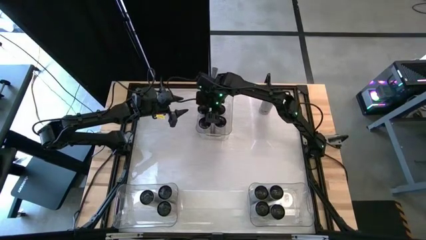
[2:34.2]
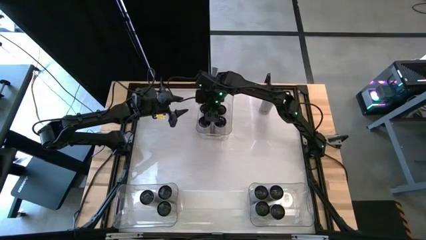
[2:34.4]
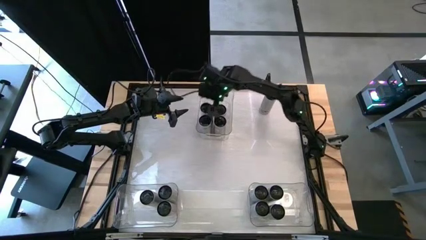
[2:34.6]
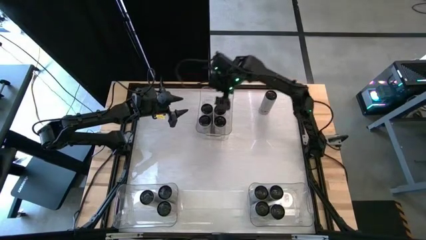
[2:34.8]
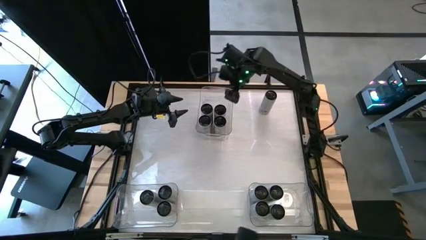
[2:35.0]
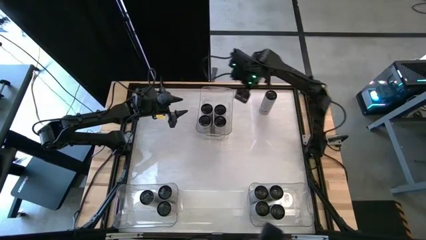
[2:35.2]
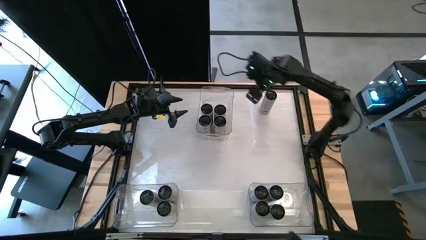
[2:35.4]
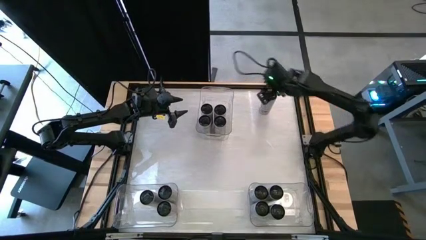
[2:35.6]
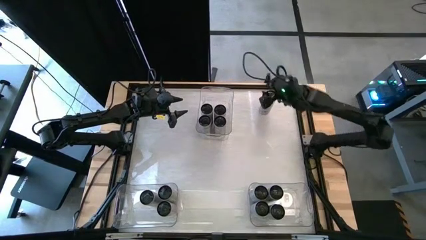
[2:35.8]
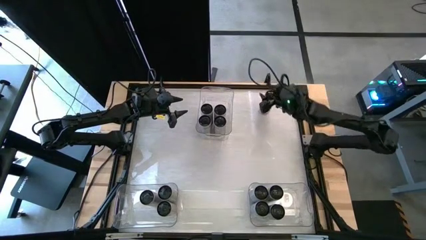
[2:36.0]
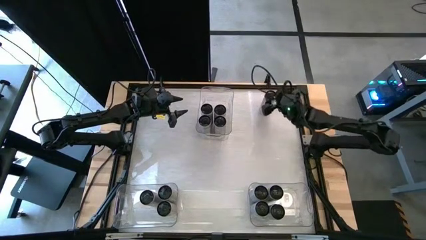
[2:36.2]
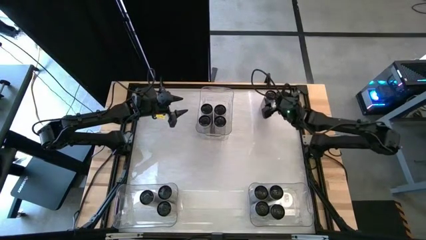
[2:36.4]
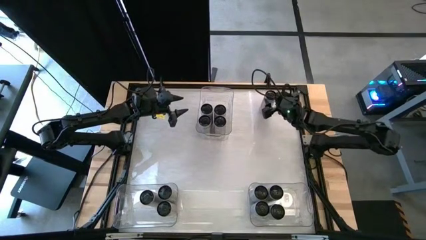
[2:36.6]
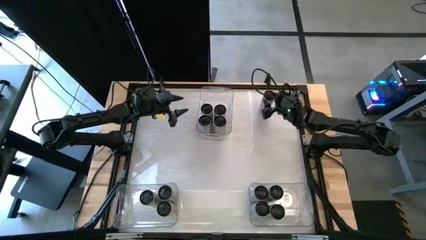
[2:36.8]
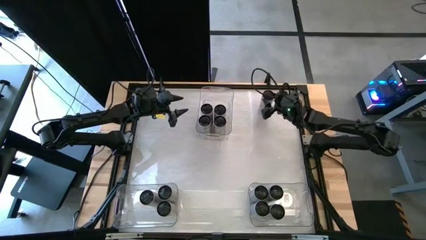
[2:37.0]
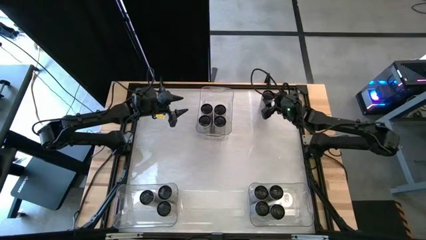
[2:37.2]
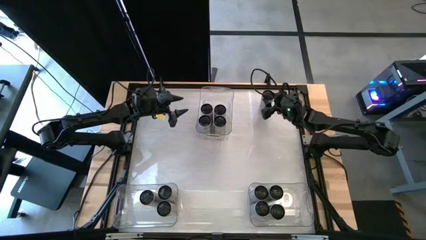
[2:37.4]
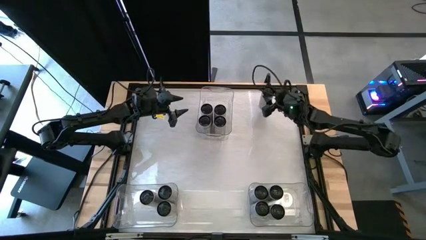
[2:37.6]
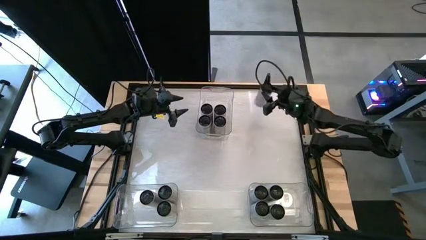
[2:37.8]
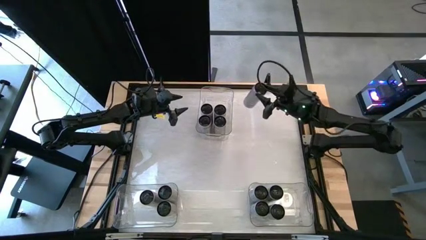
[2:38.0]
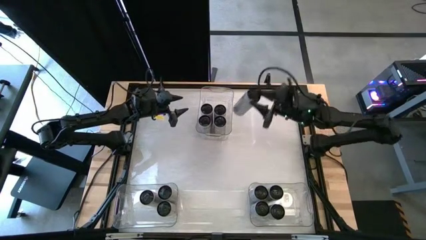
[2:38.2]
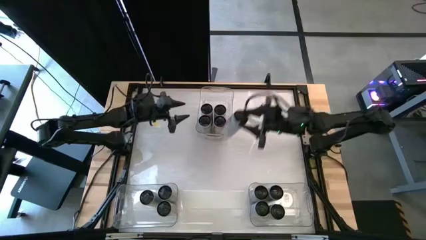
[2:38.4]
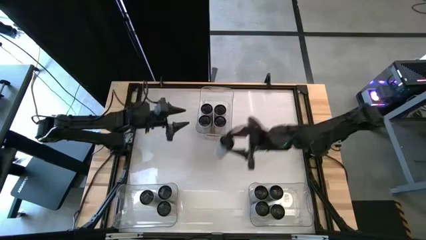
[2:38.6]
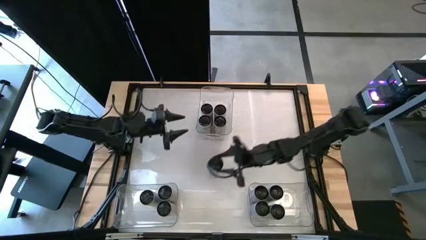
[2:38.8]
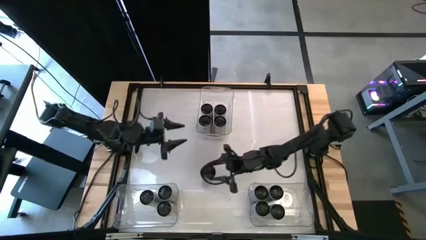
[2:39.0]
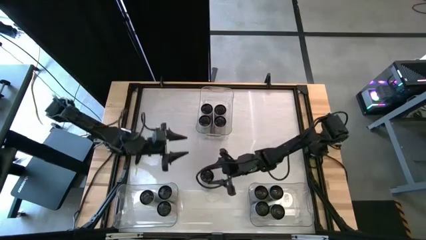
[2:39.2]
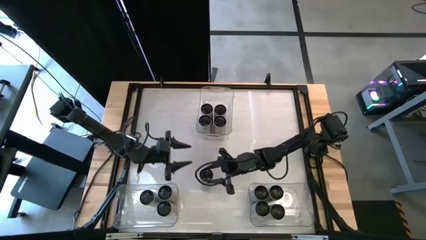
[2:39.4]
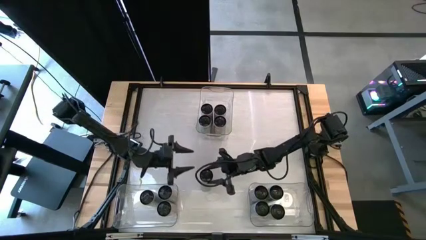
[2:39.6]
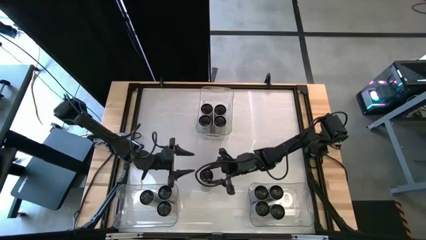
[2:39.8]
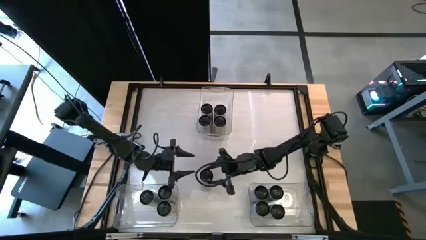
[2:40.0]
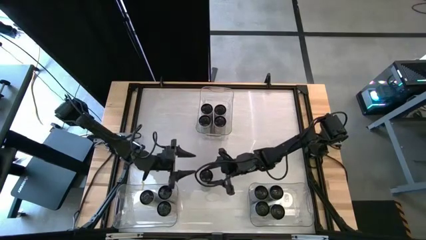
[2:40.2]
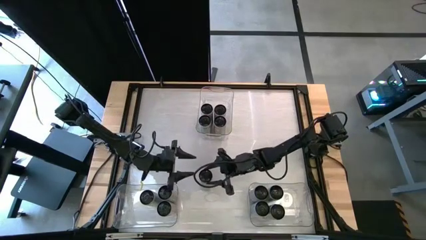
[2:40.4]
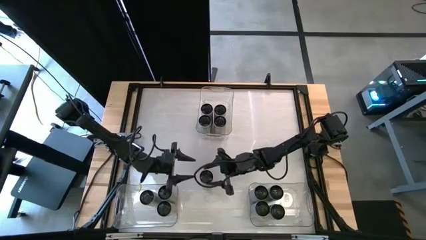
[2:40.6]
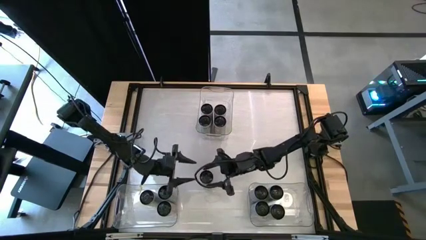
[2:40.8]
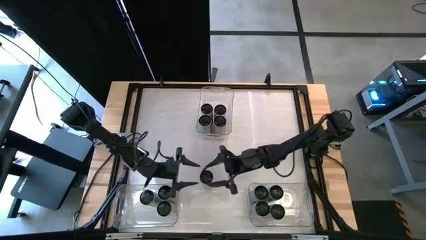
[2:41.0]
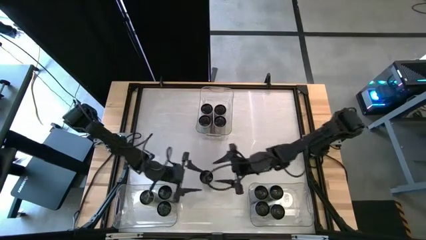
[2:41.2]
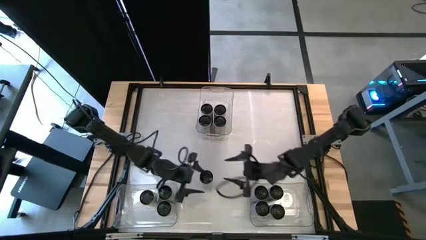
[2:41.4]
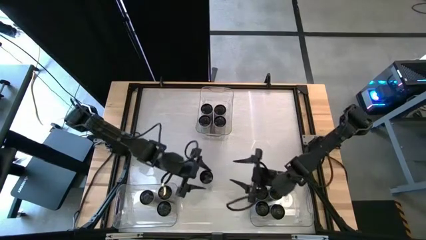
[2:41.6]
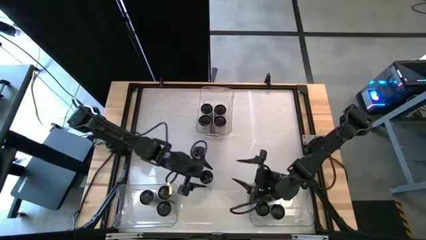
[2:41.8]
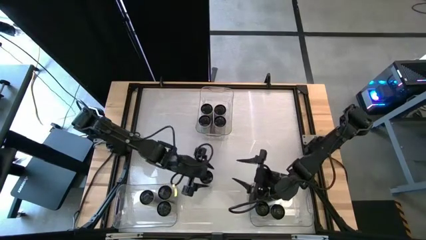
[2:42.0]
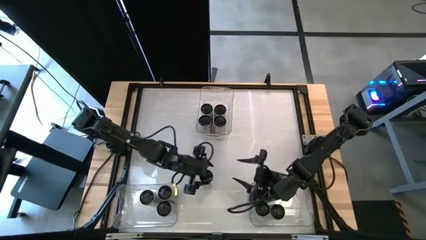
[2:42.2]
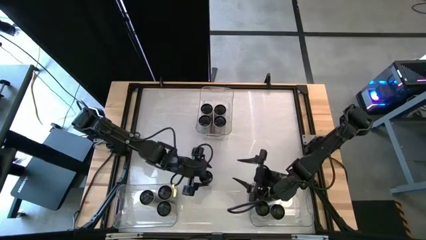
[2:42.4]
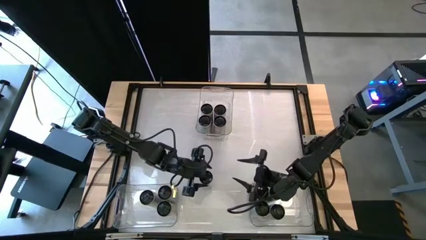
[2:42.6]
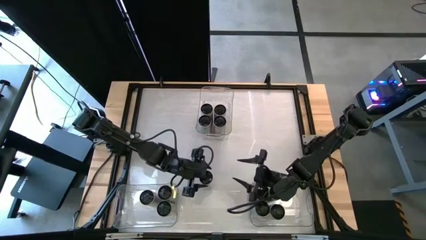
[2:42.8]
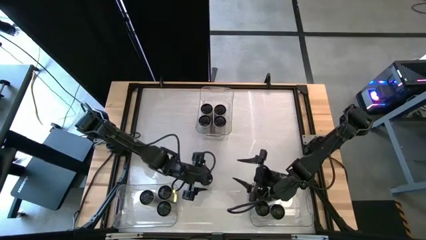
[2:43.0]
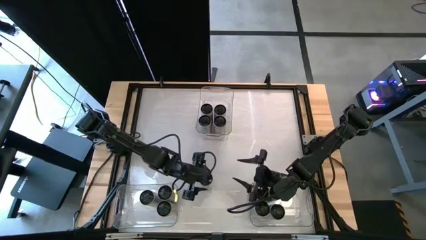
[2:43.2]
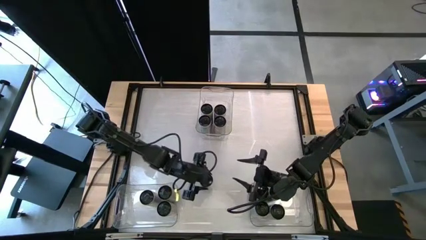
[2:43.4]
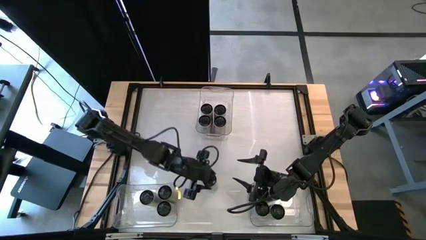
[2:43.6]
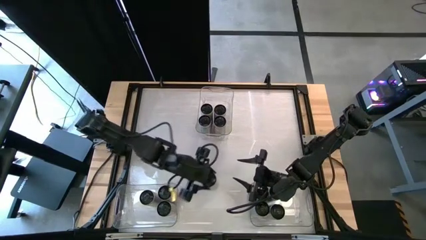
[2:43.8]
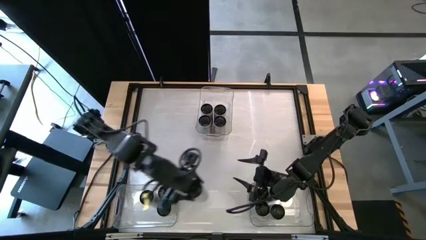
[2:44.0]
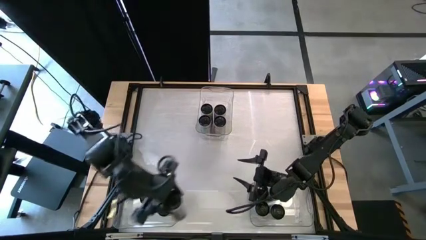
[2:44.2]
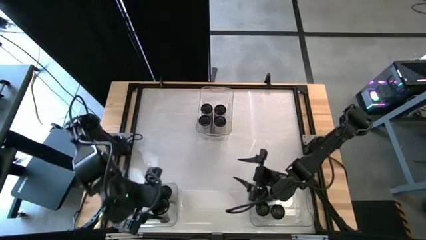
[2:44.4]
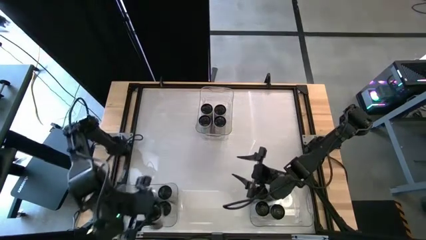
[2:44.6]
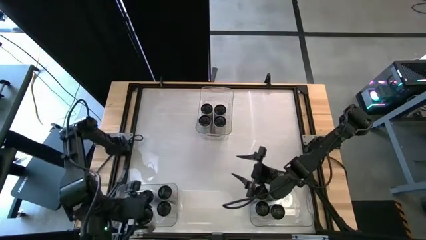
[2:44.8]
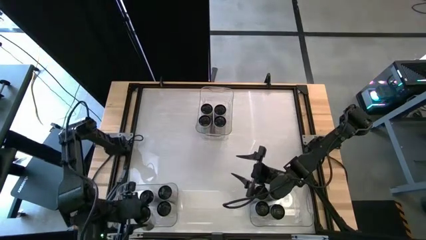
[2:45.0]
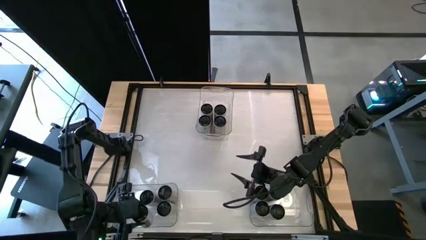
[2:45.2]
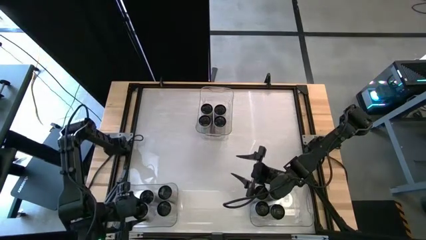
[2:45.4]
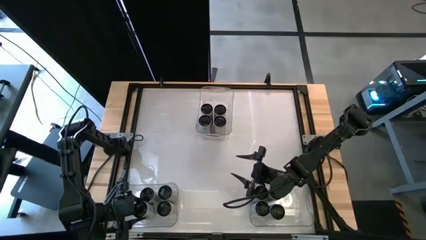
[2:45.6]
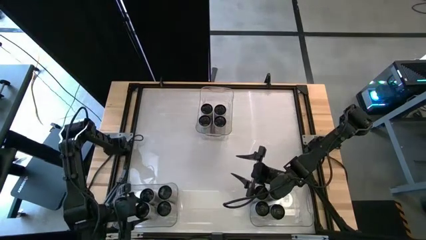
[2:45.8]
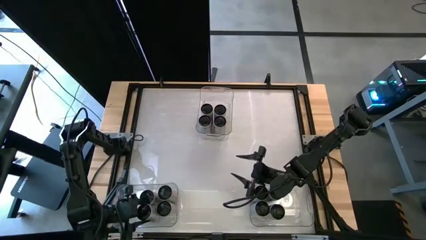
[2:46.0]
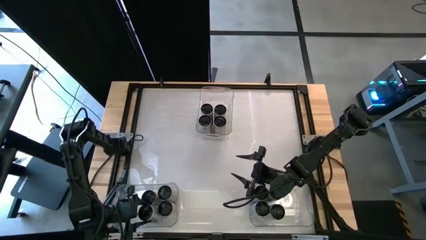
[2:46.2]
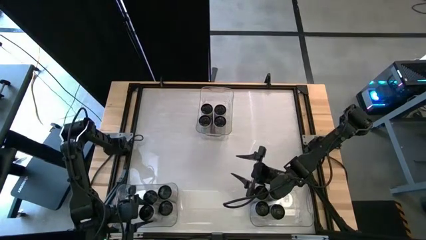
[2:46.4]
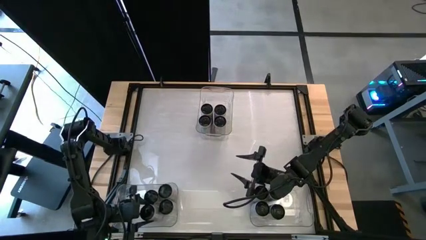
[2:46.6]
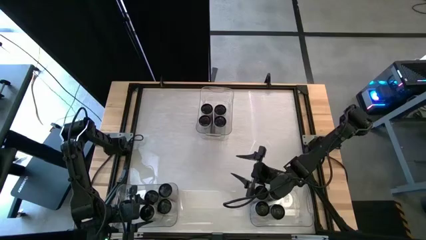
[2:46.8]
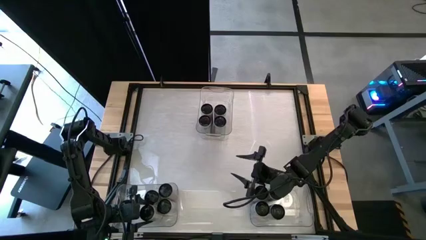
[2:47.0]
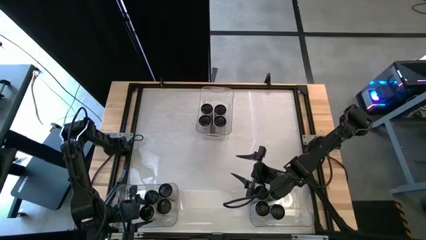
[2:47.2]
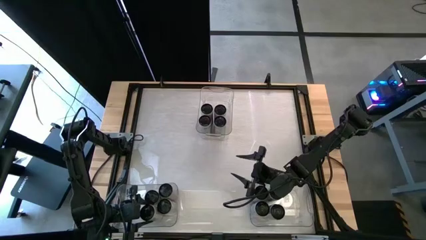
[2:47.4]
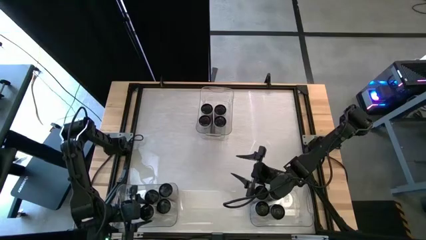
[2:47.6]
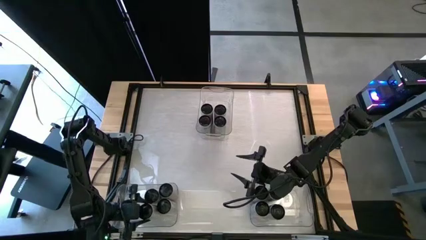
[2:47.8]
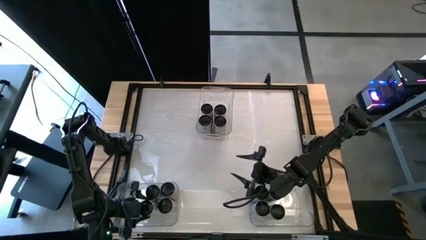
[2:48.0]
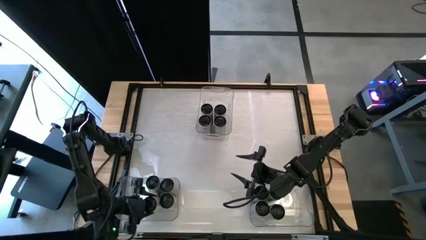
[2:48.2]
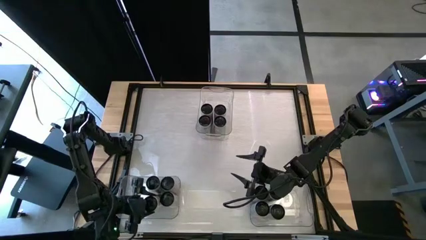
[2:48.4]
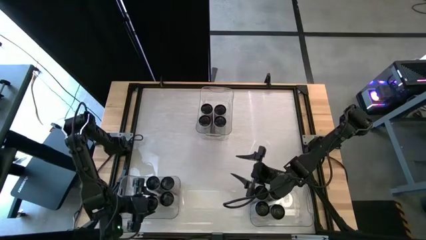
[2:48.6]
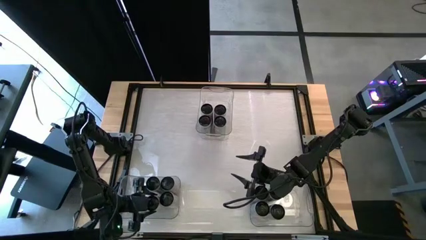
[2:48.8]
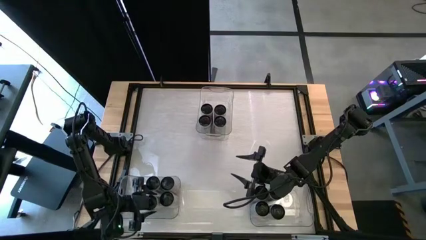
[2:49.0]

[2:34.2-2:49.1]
Task: Sort soda cans
Put the white pink soda can into the bottom left transparent bin
